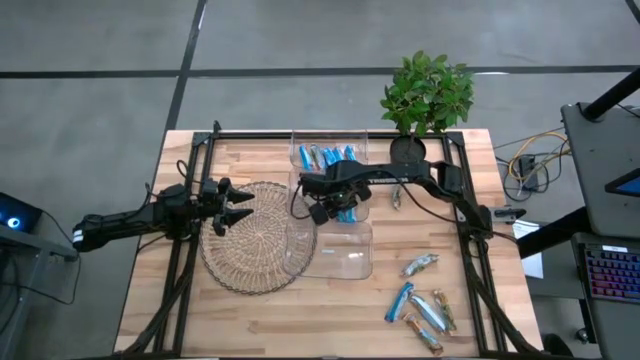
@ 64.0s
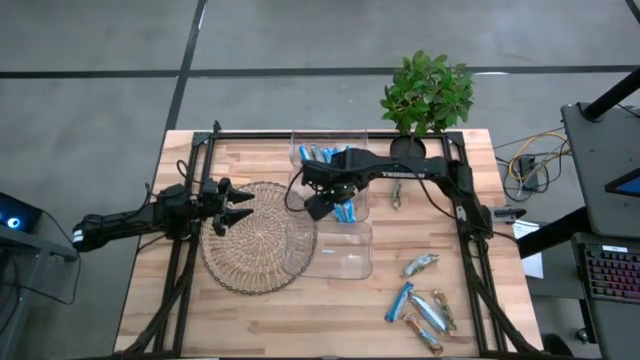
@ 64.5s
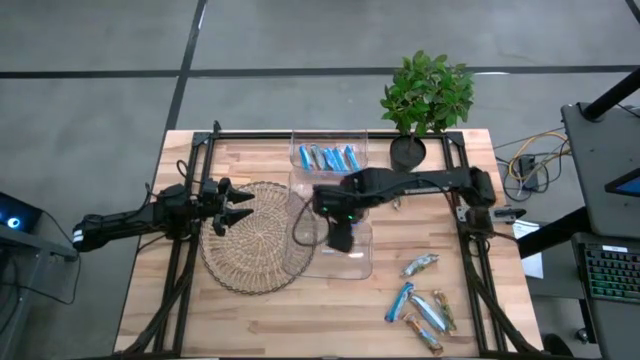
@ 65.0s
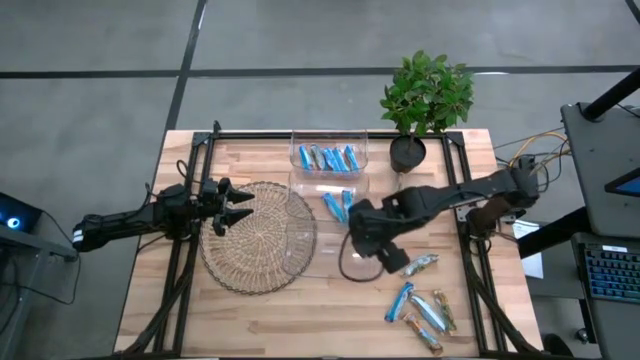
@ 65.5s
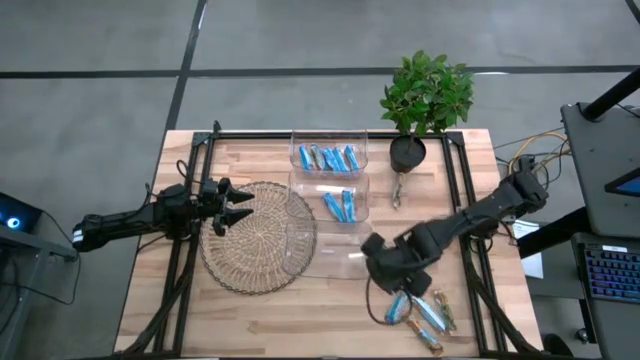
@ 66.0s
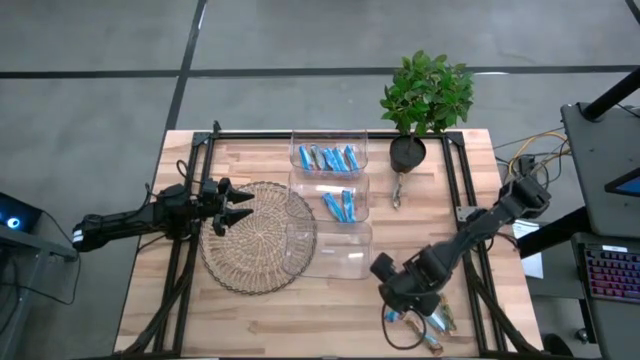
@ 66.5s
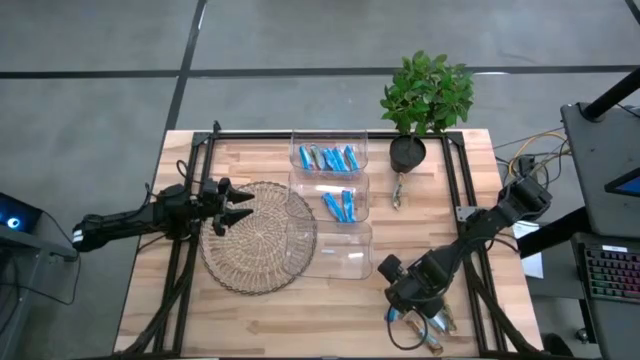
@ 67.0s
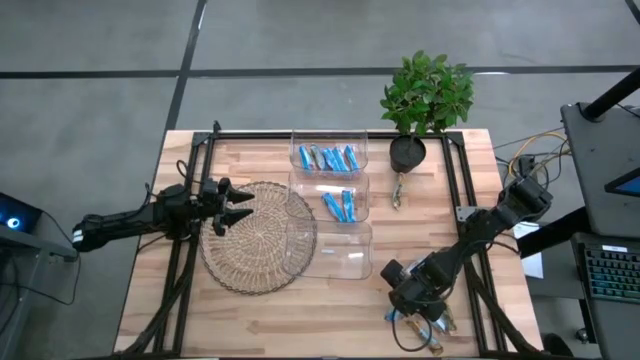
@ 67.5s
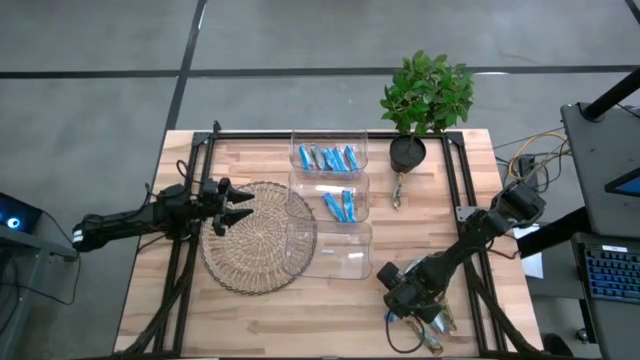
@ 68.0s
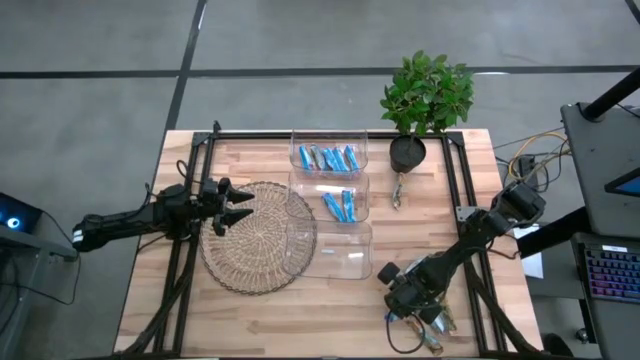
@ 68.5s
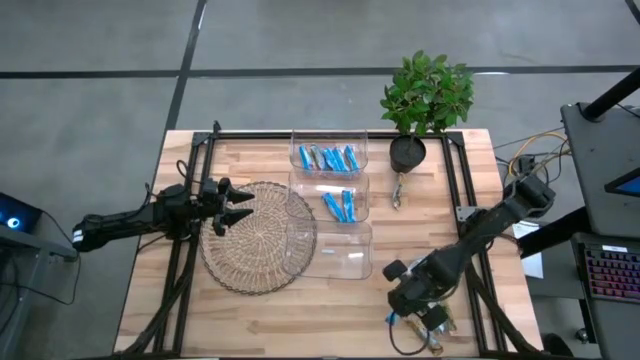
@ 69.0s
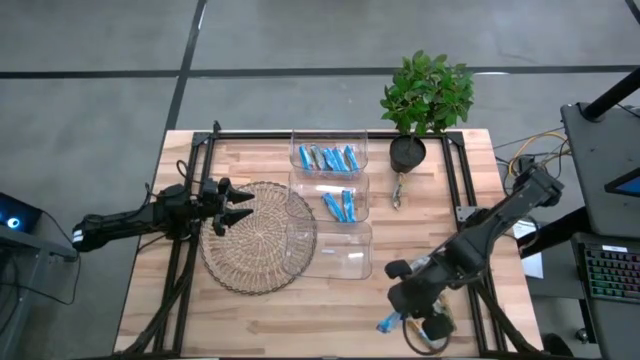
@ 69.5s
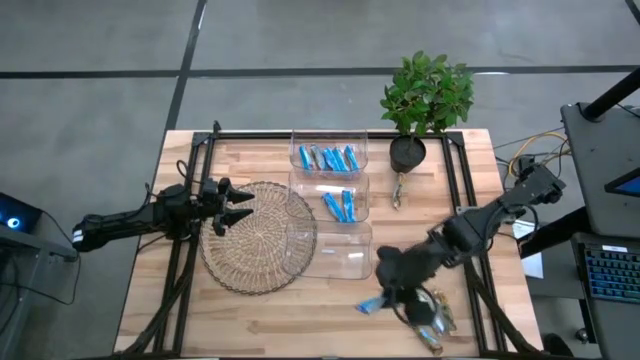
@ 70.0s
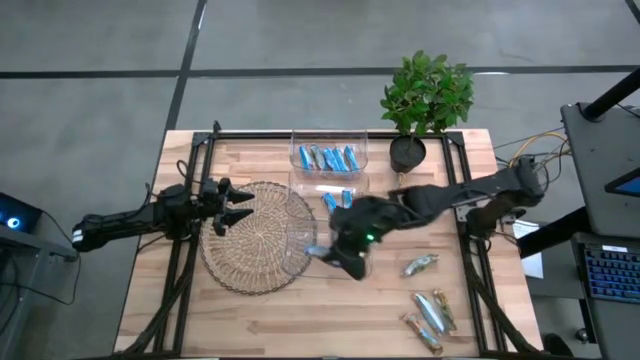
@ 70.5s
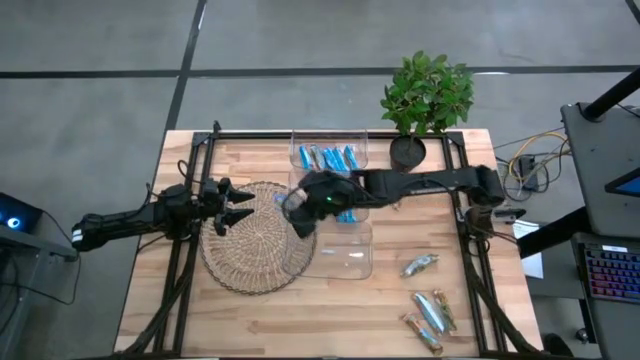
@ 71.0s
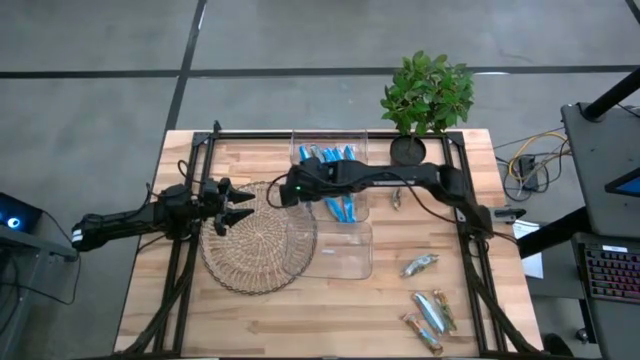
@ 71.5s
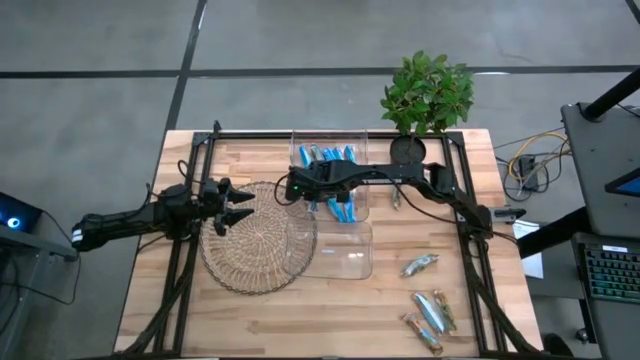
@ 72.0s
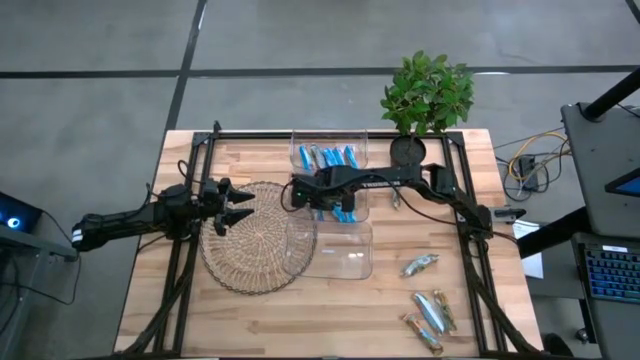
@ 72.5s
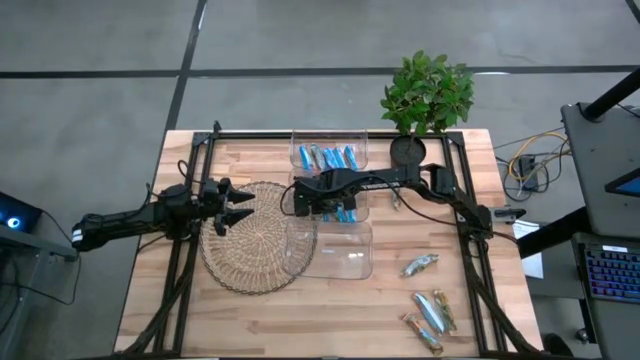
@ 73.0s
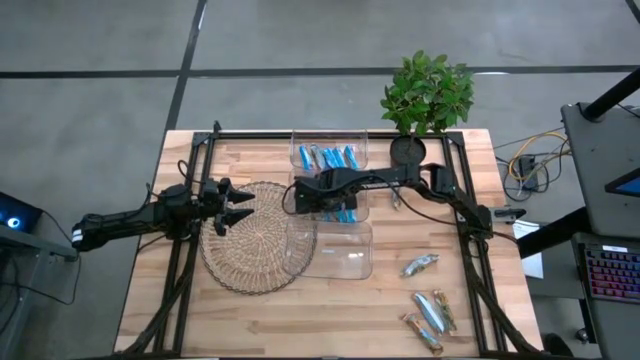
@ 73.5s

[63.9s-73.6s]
Task: Pick and place Granola Bars by type
Put the blue granola bar into the middle transparent bin

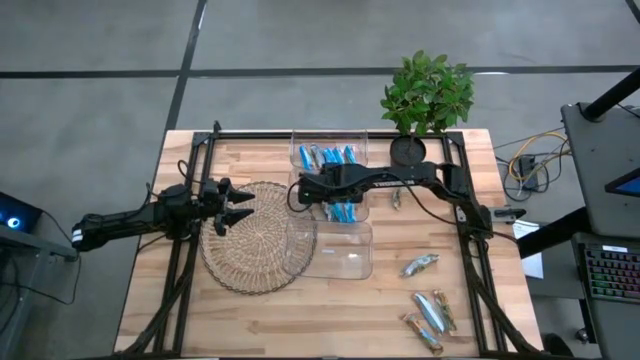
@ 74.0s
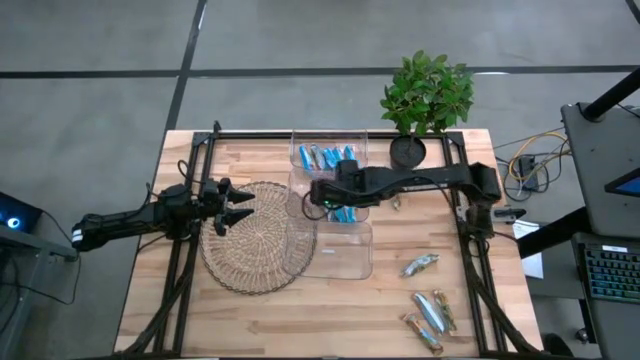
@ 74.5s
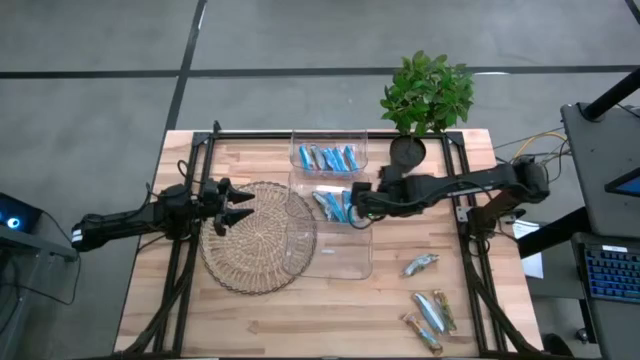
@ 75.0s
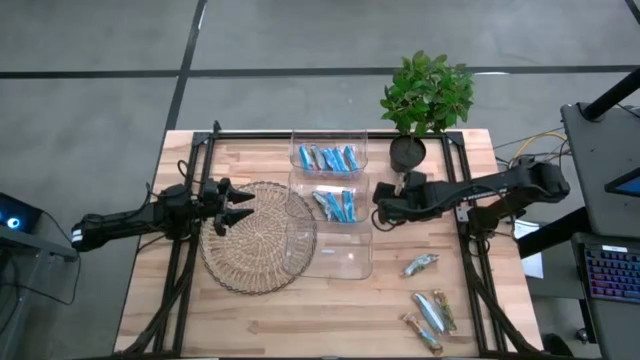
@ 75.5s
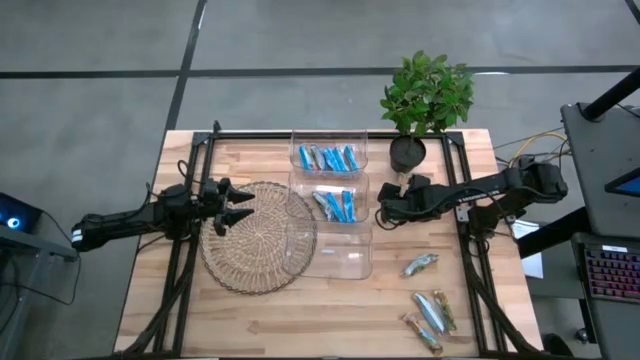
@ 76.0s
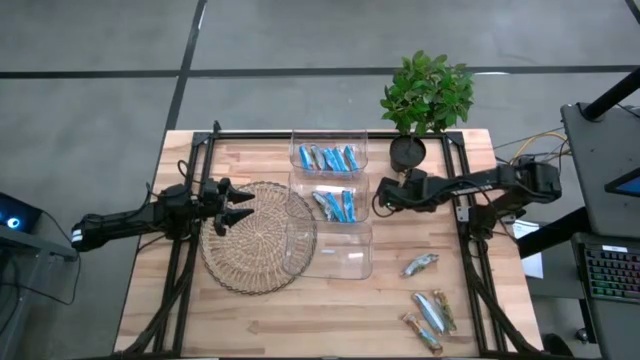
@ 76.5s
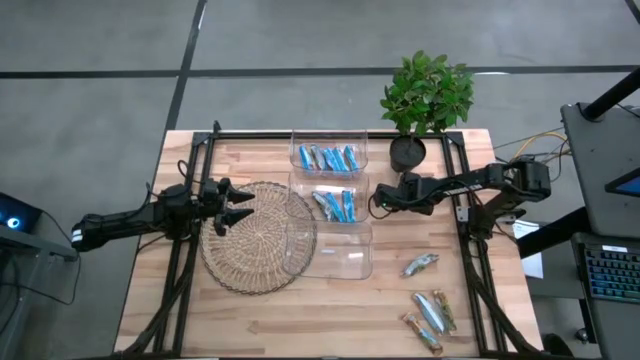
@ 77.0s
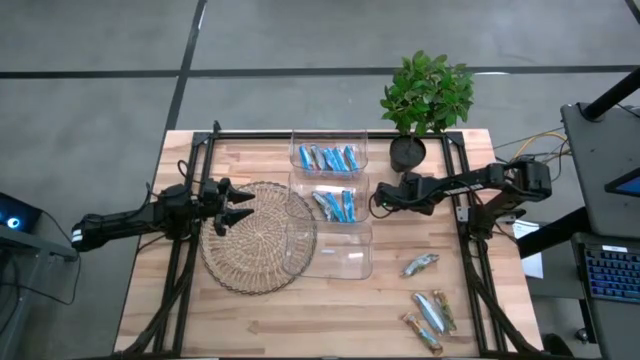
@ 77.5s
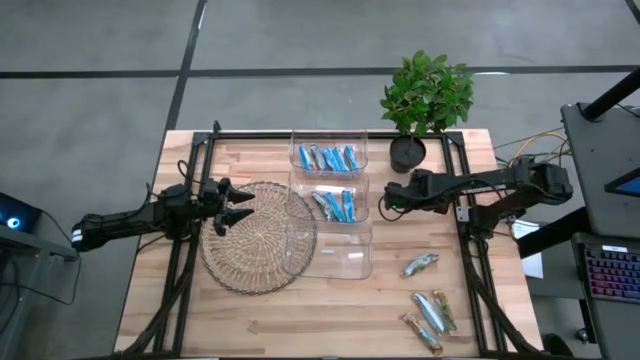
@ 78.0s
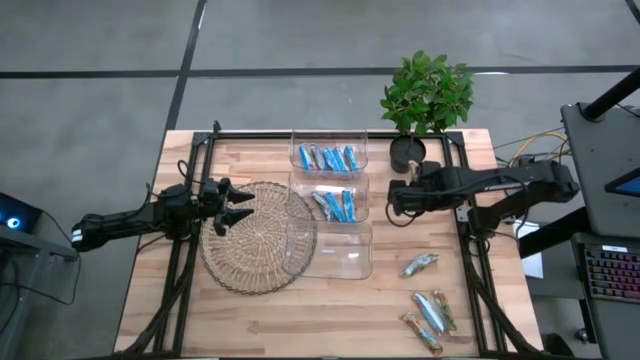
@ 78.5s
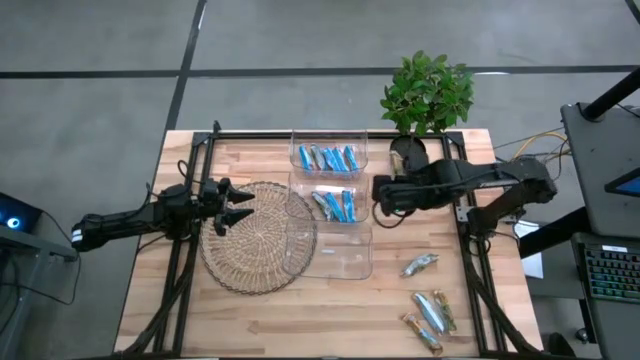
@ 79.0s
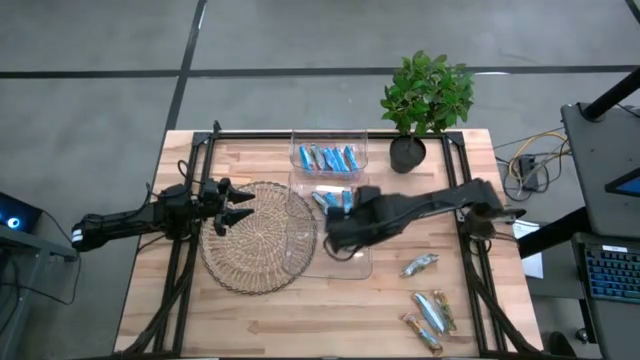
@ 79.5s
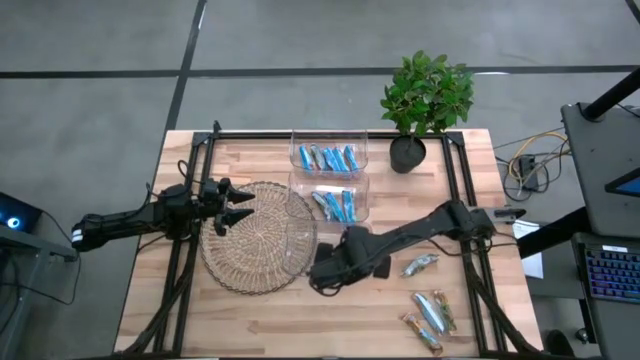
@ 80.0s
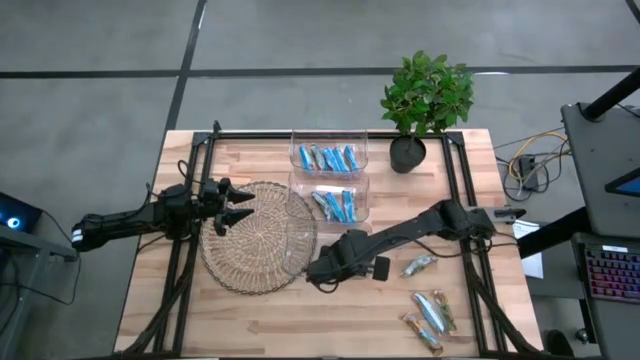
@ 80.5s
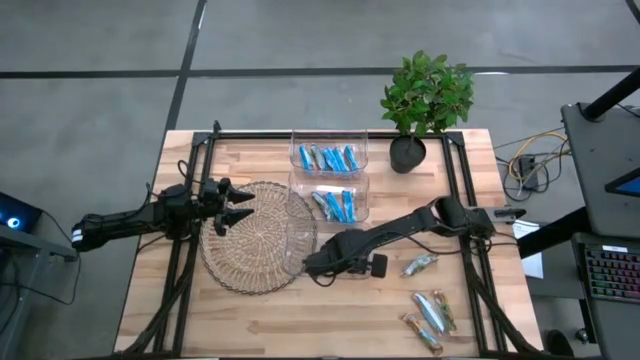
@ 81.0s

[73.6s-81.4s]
Put the yellow granola bar into the bottom transparent bin

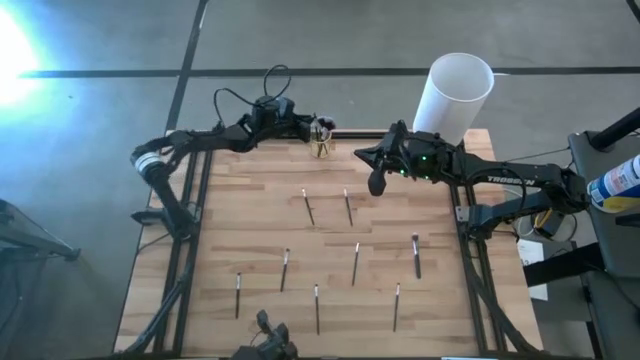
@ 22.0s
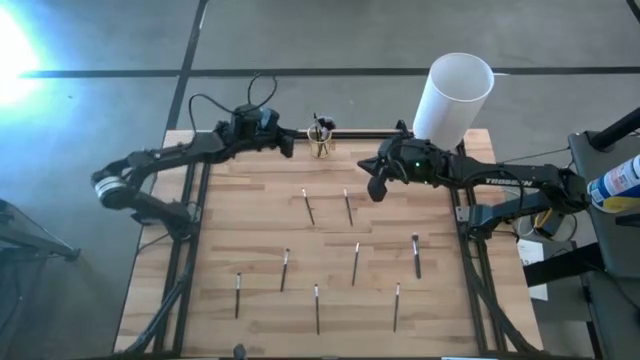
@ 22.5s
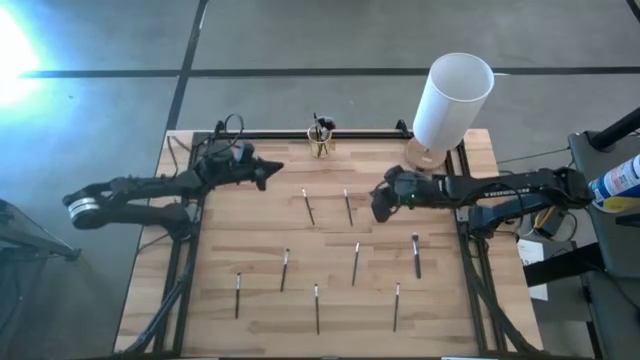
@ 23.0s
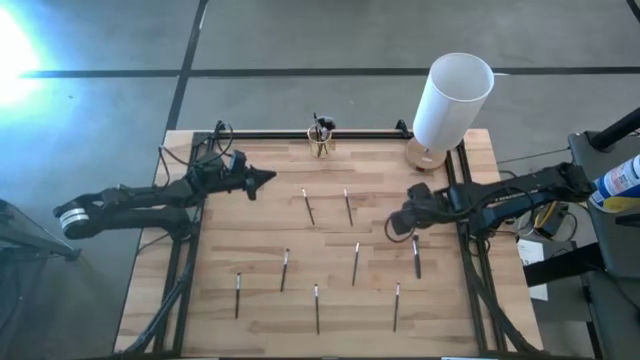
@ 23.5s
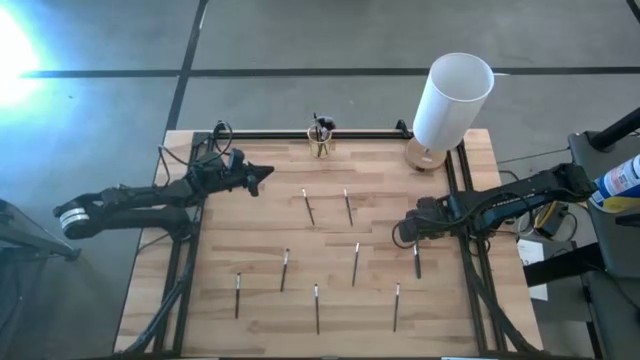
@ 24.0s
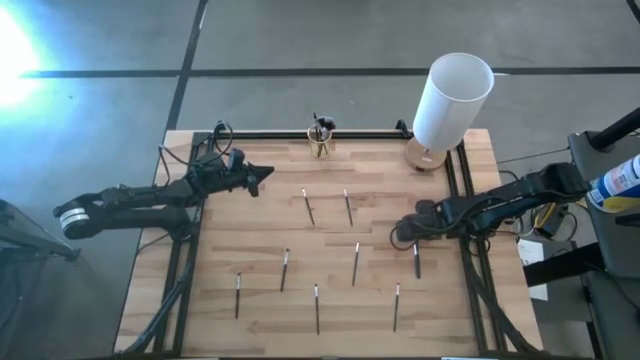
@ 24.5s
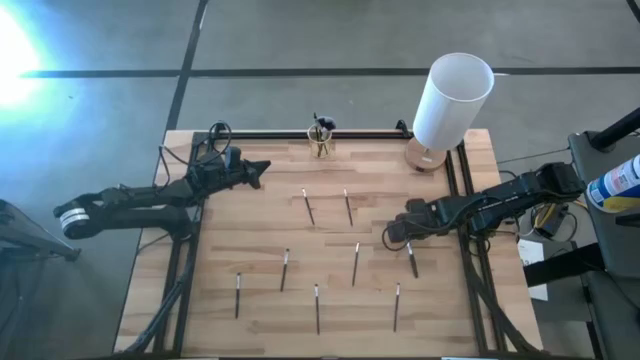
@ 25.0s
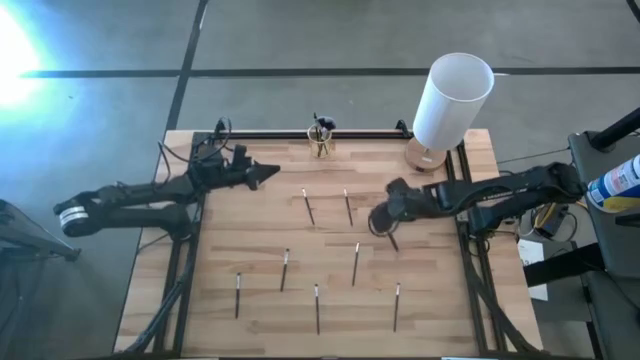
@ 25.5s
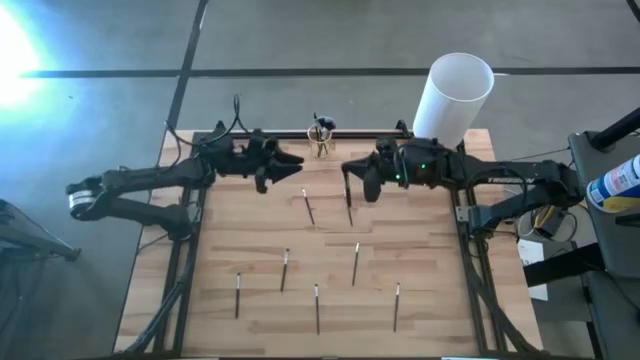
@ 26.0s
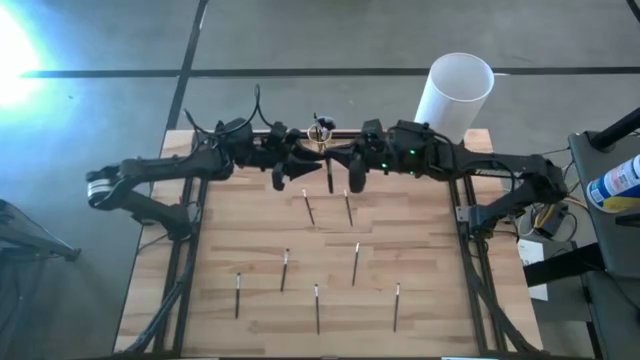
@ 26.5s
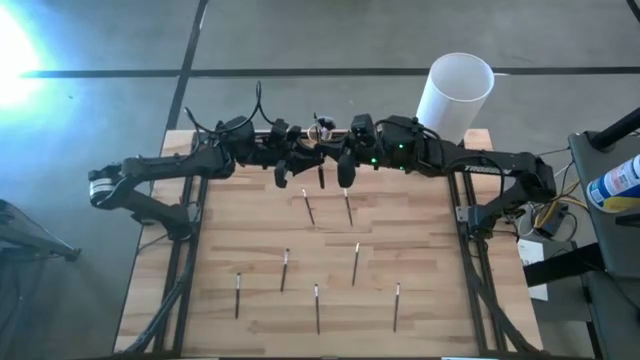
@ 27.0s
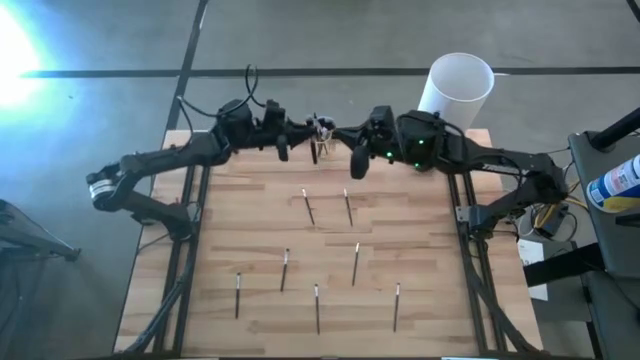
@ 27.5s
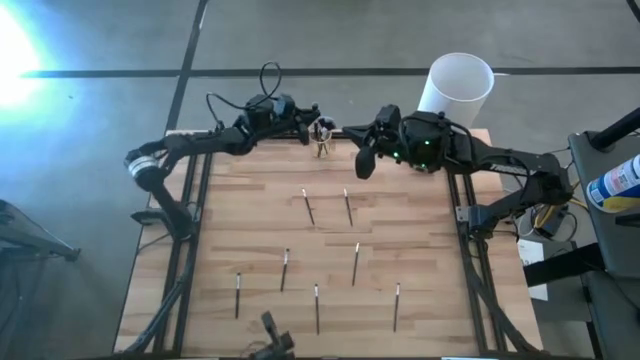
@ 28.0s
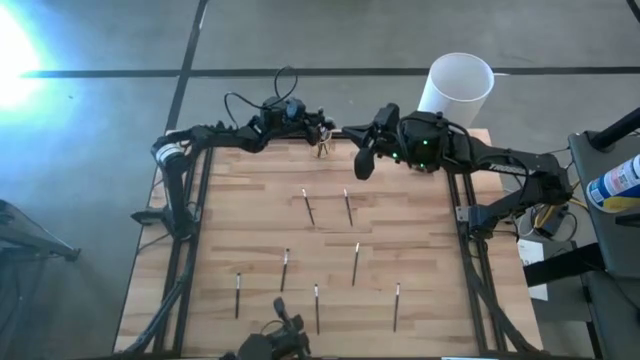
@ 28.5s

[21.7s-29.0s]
Task: Put items in baskets/containers
Put the black foundation brush into the yellow pen holder
